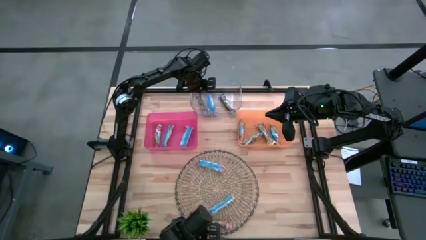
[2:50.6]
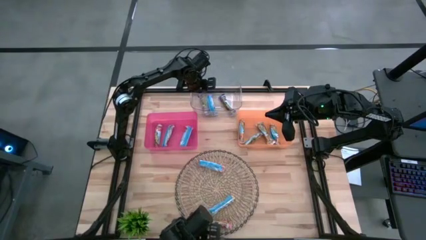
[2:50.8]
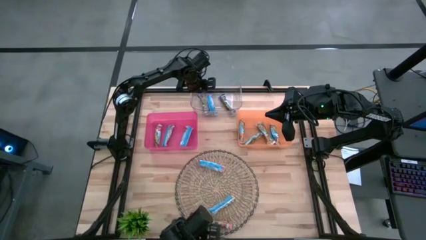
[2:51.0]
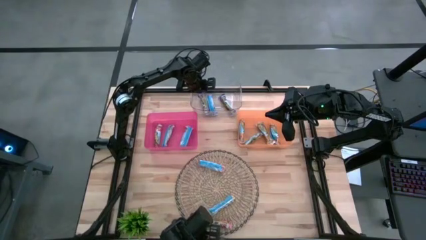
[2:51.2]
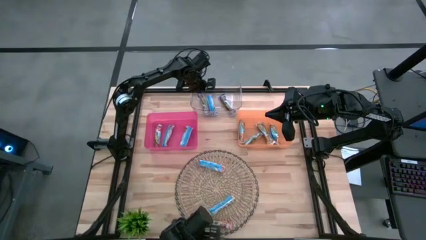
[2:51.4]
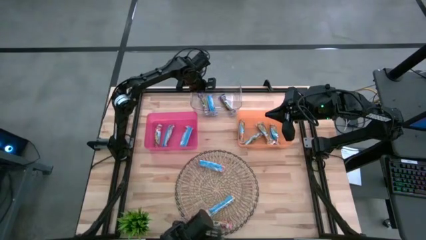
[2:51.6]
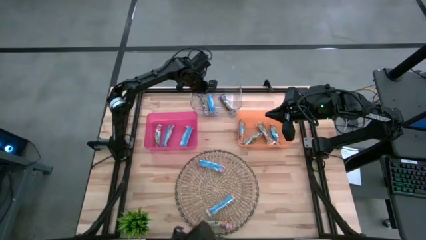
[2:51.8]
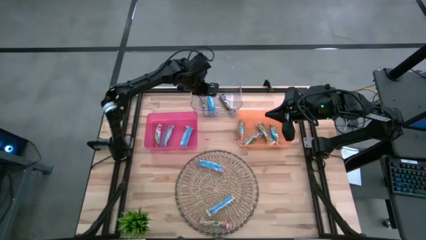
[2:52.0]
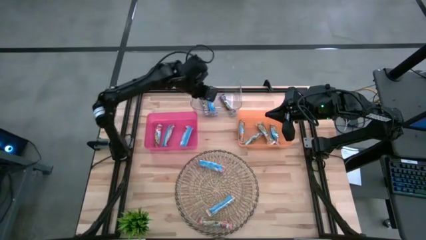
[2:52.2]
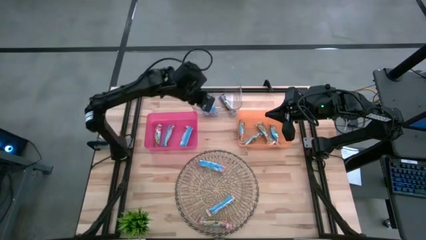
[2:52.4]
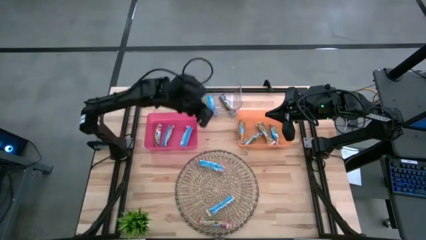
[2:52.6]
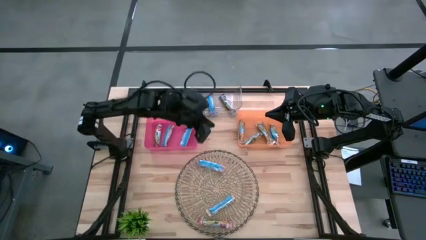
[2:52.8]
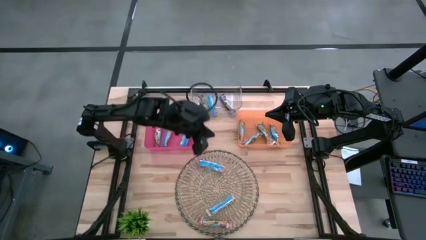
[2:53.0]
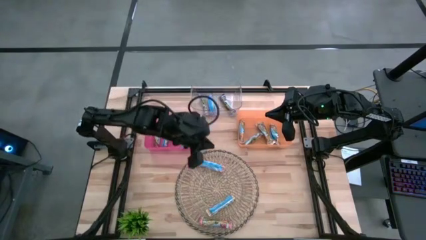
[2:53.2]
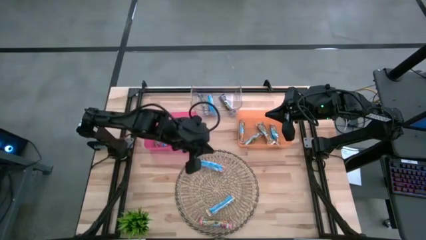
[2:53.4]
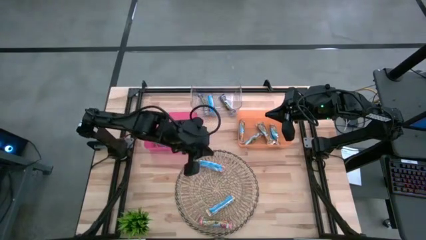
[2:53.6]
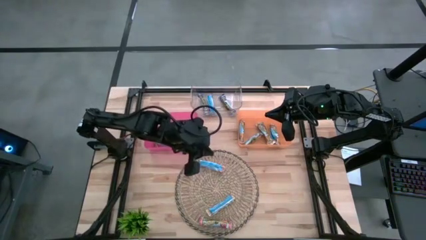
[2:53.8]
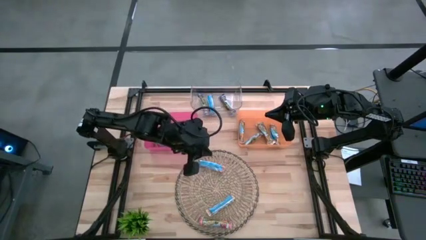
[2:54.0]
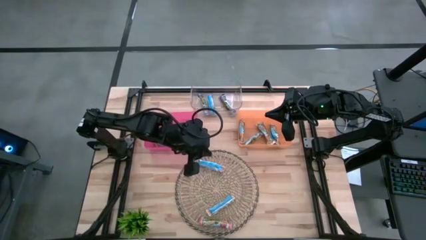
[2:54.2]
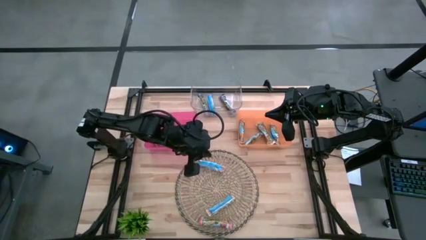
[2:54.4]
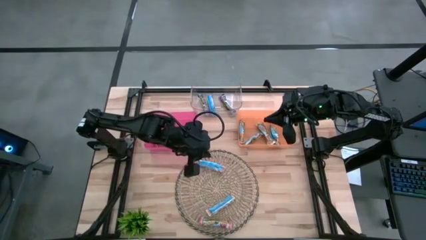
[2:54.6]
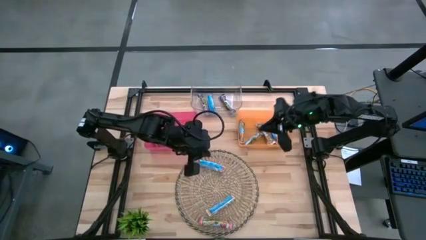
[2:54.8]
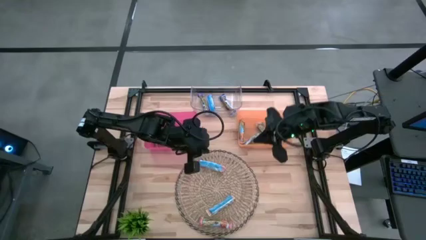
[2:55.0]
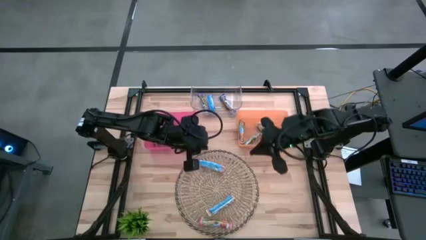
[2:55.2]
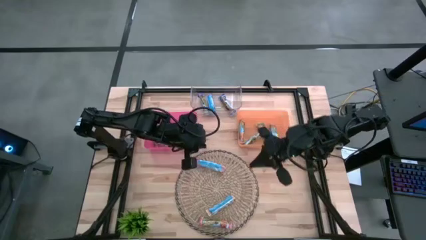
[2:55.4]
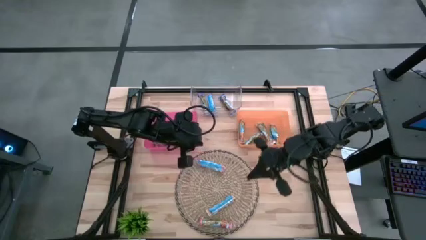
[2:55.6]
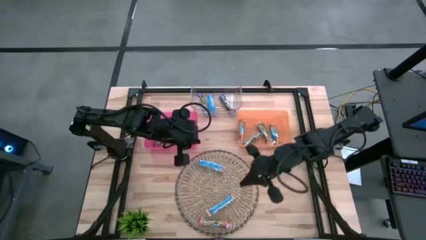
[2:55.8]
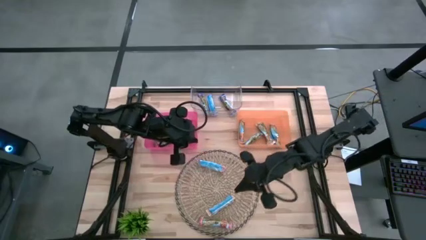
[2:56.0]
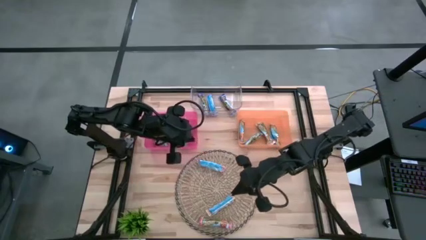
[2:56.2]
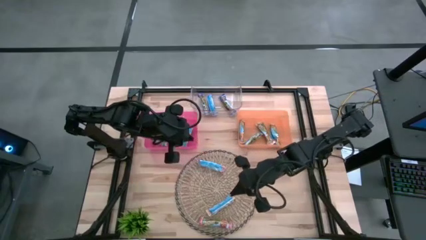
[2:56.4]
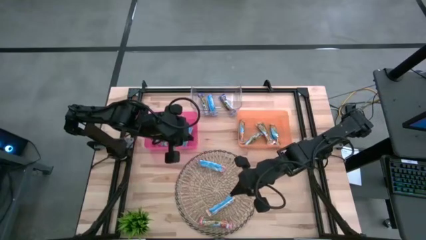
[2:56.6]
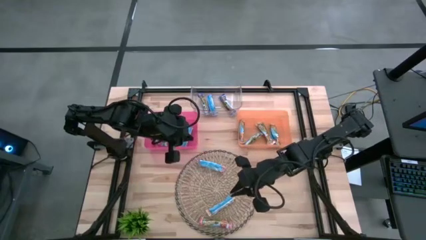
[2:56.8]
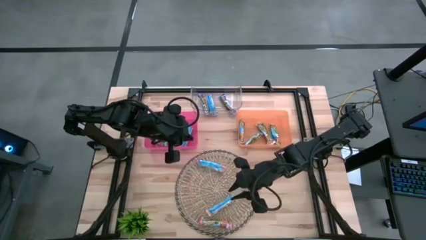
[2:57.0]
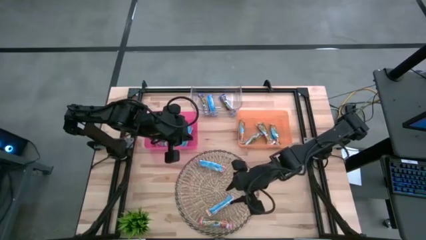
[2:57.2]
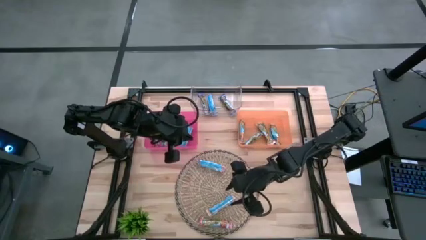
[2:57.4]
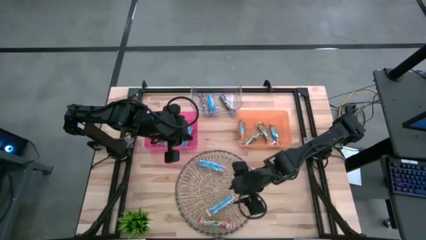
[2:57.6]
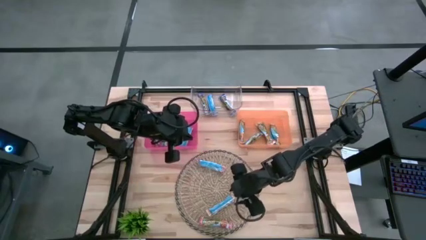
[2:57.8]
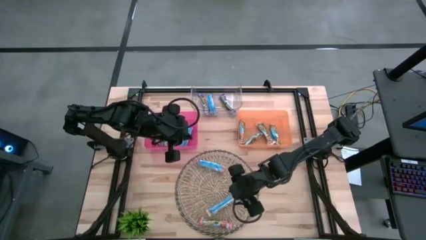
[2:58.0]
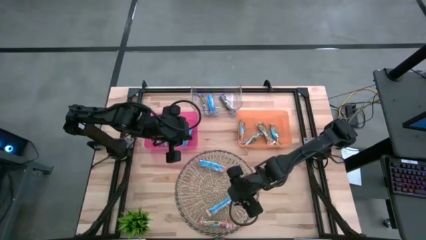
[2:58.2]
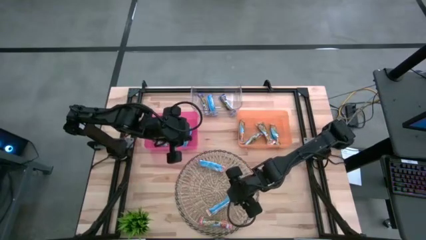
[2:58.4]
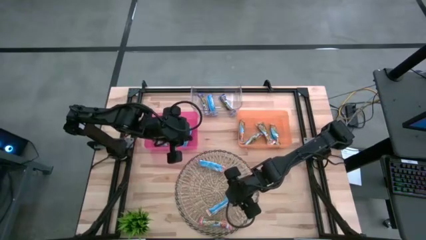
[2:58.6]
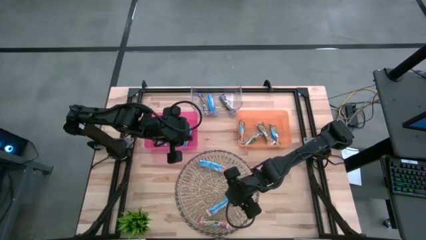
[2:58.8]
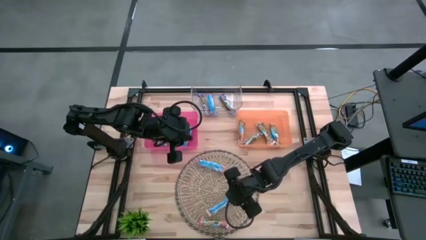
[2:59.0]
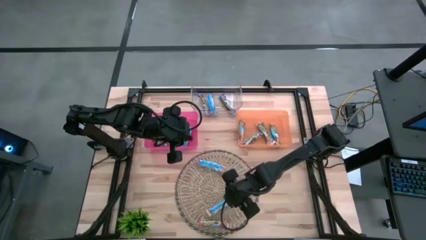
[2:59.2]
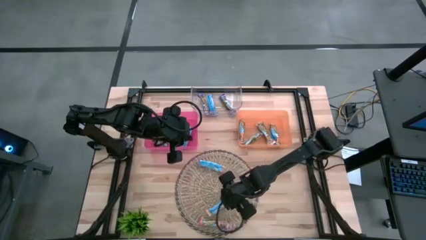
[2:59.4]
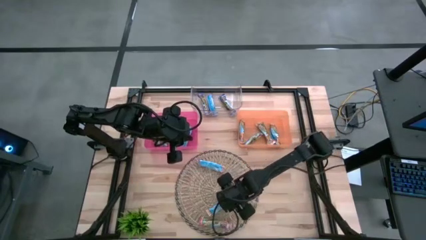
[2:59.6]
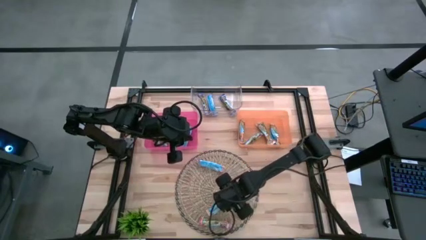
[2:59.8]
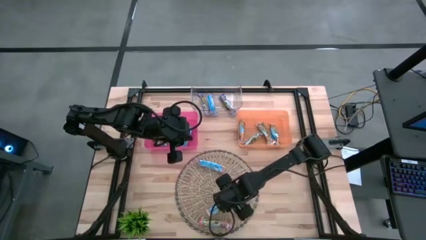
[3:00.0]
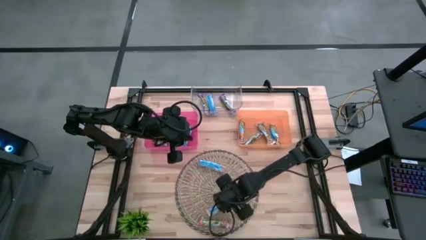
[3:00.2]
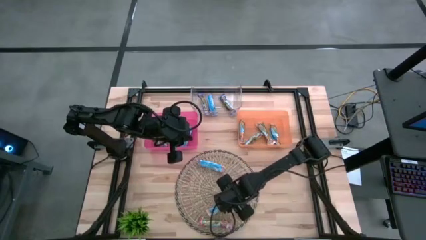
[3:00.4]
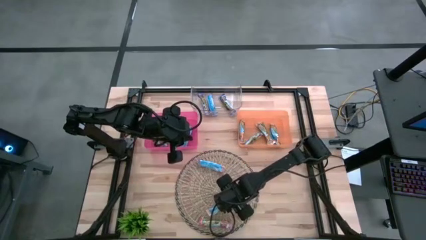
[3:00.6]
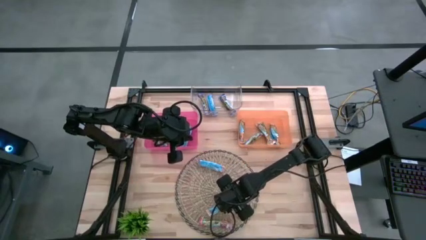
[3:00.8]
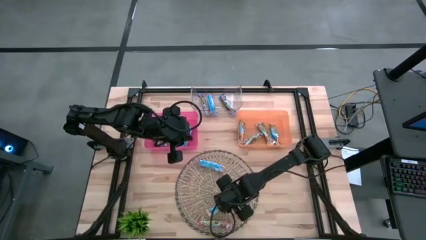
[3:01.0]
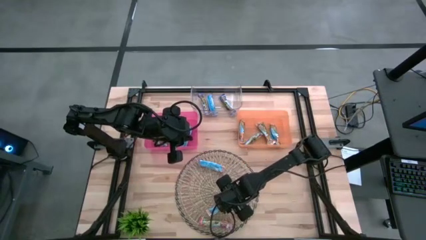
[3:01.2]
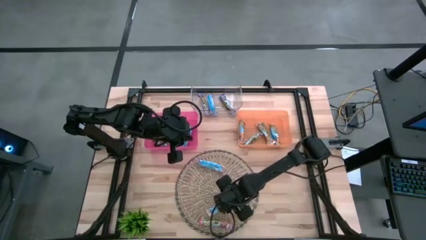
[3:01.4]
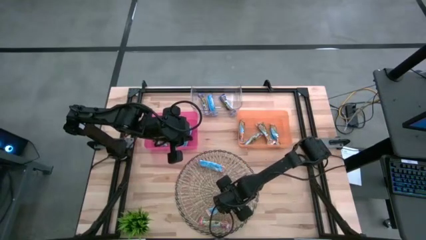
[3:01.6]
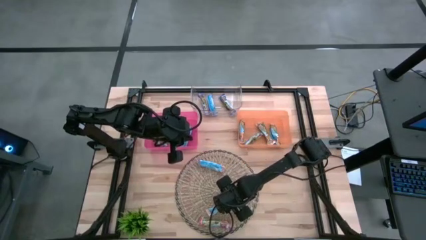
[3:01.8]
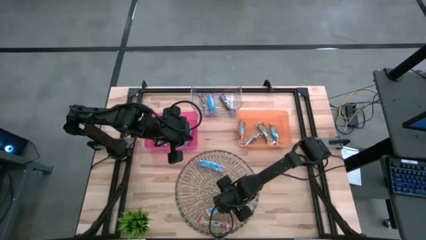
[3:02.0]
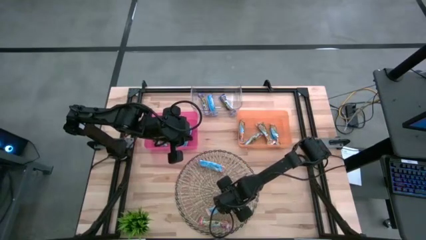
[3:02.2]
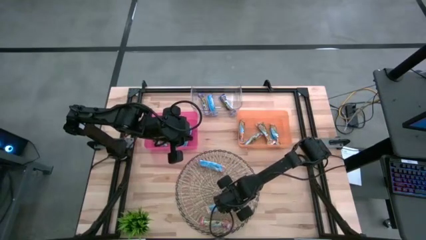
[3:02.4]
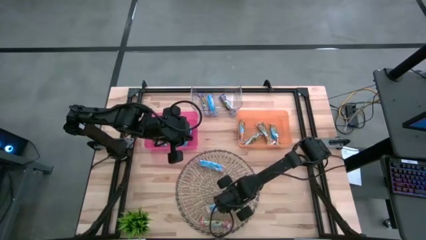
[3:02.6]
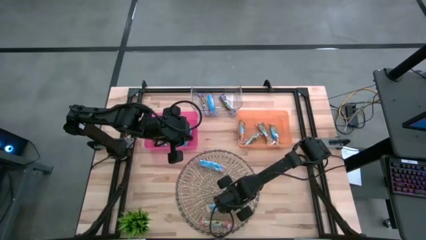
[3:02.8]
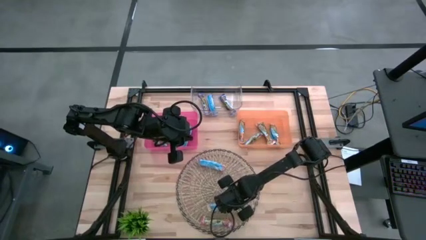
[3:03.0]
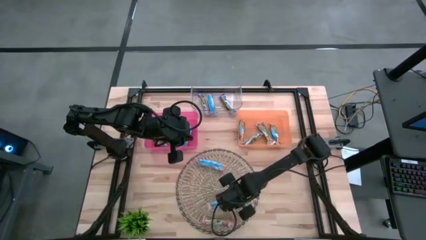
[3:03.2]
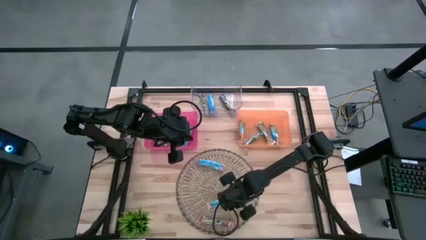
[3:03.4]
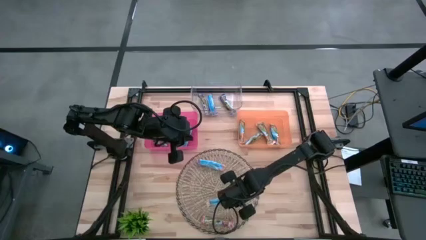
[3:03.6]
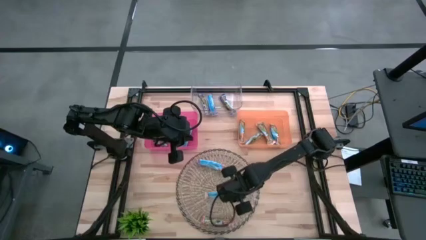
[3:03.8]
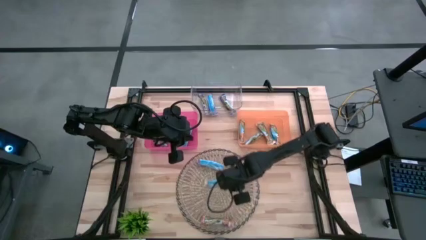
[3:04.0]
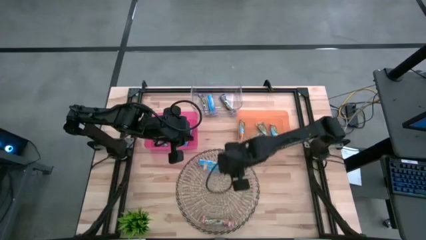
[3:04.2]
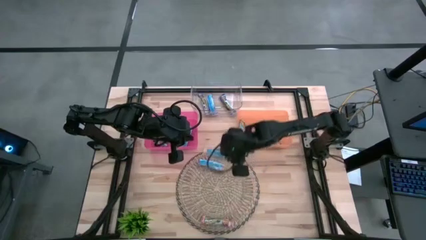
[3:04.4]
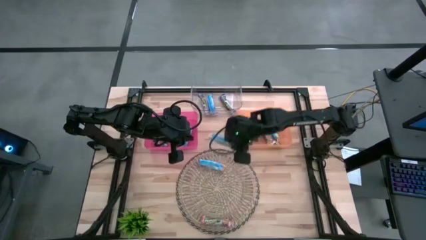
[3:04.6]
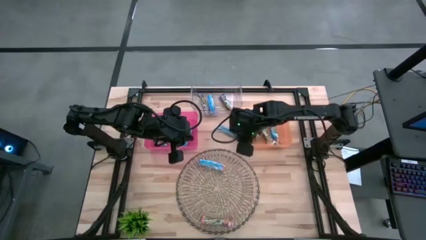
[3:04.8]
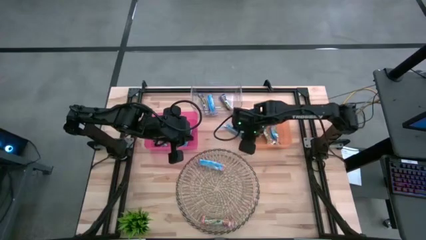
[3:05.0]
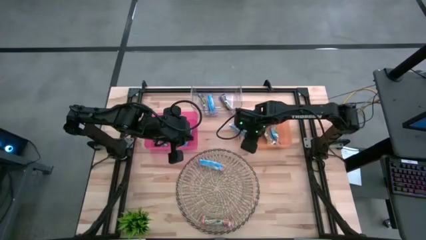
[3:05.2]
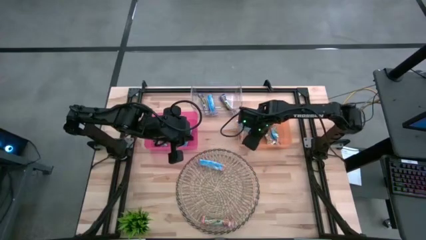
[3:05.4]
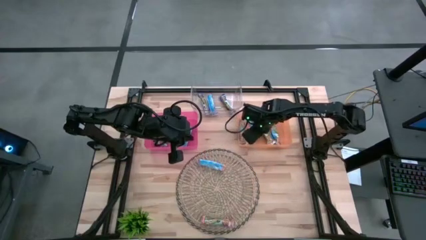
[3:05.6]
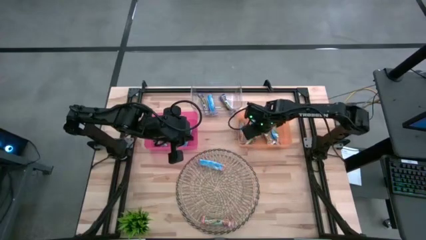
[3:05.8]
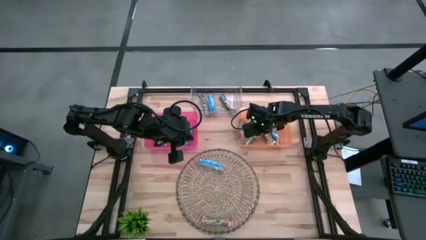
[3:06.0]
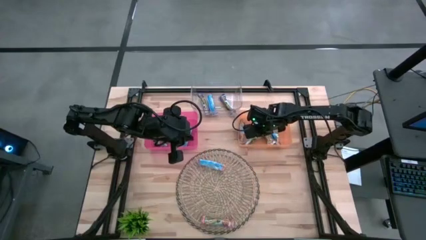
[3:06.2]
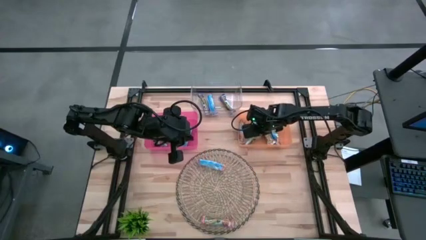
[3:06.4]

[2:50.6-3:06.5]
Task: Pick and place Granola Bars by type
Put the yellow granola bar into the yellow bin
